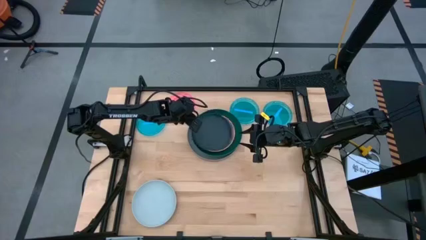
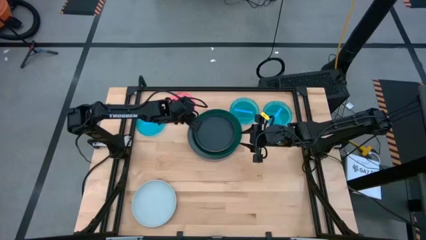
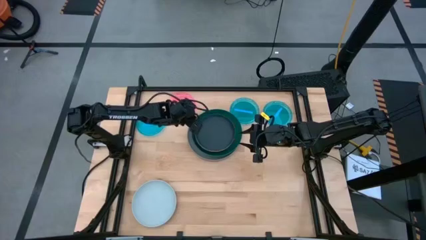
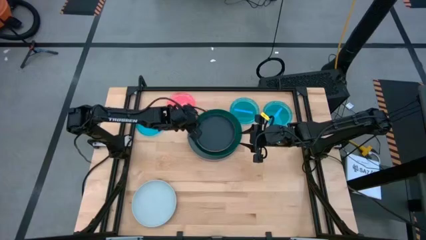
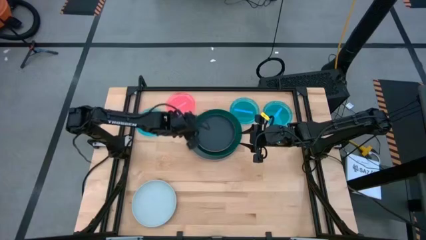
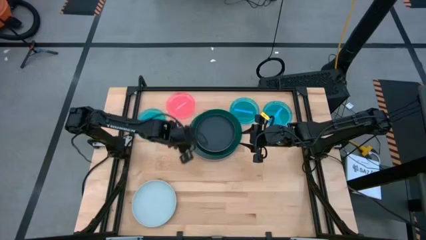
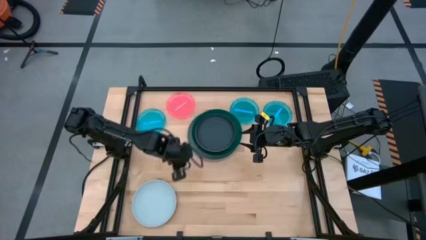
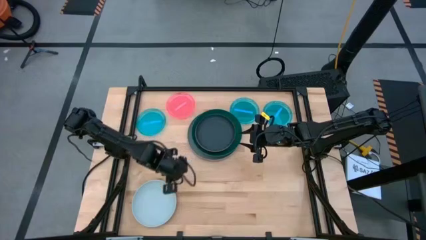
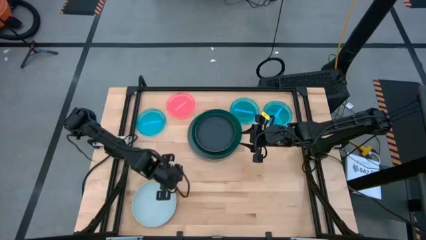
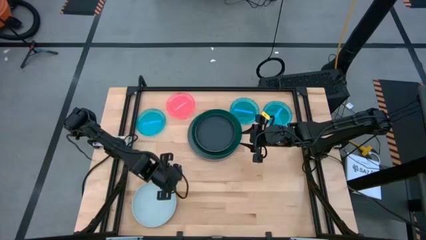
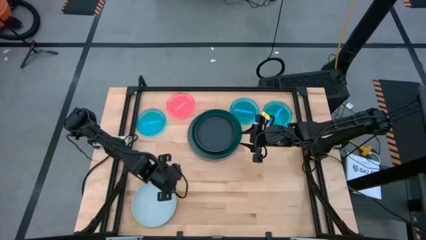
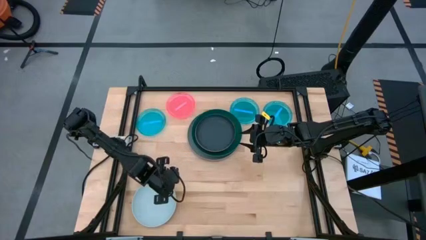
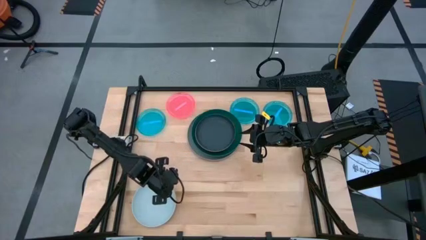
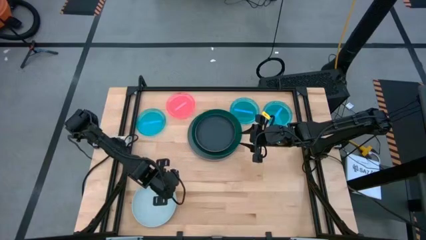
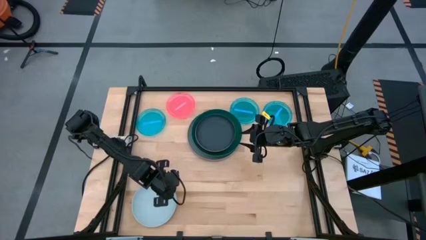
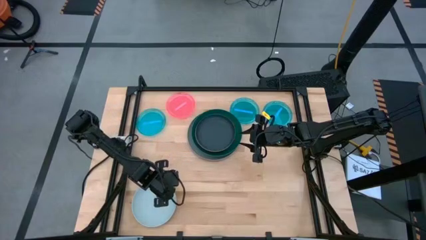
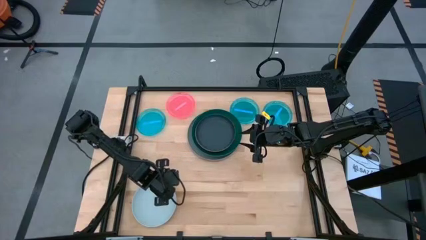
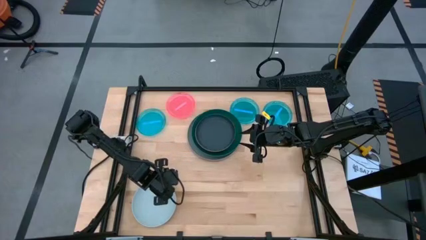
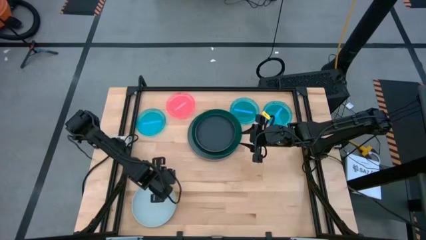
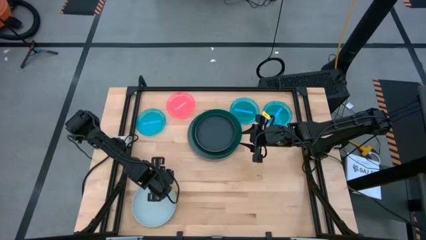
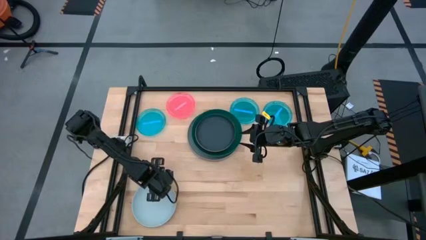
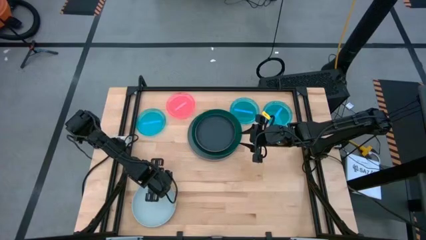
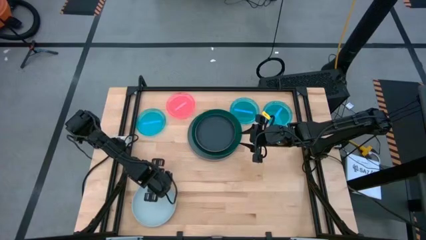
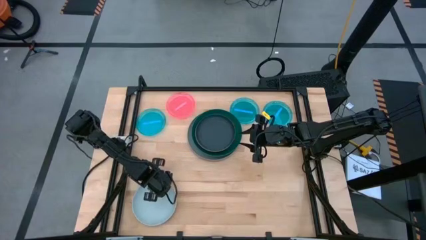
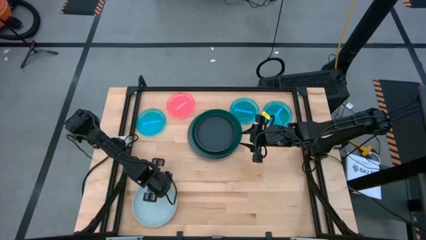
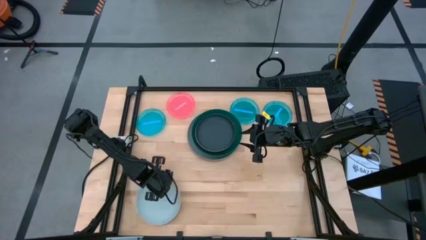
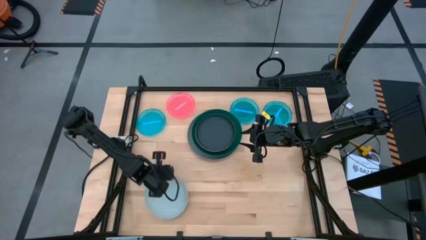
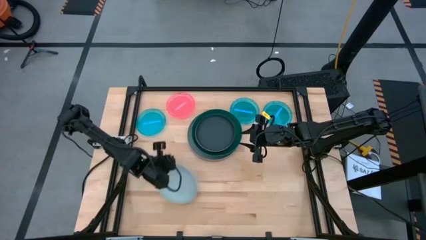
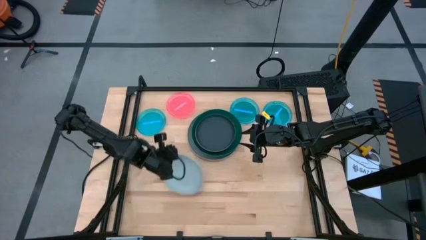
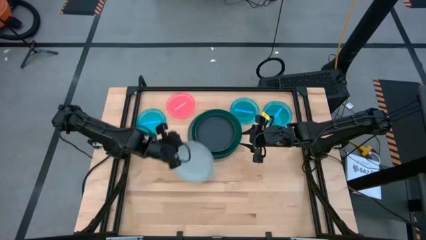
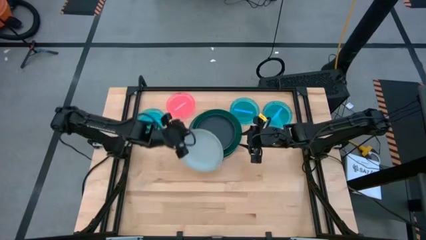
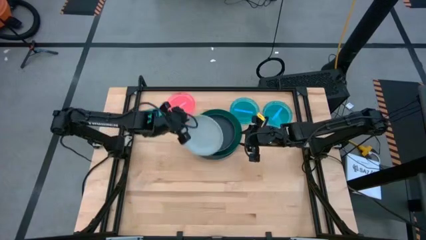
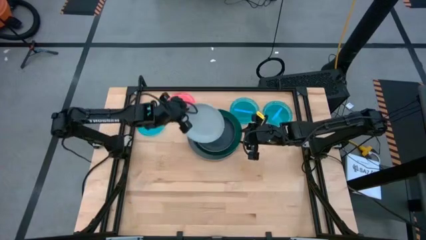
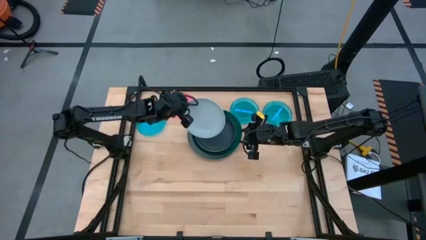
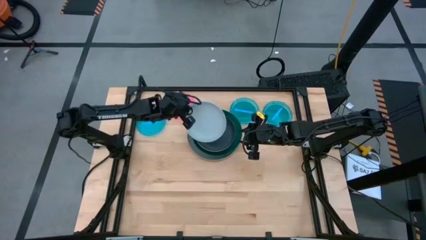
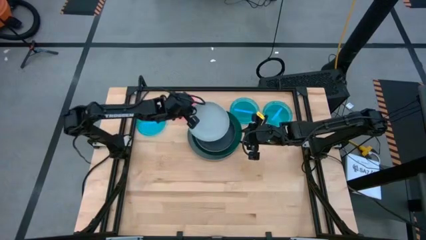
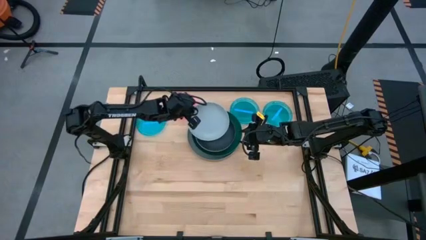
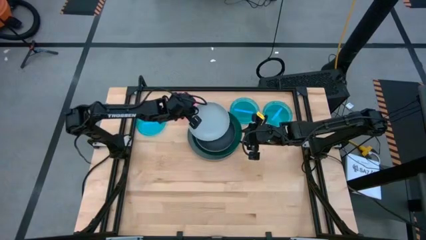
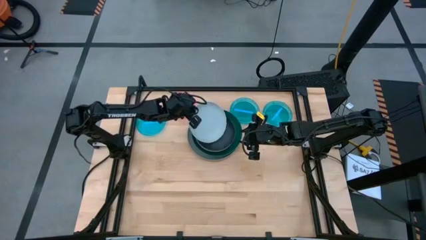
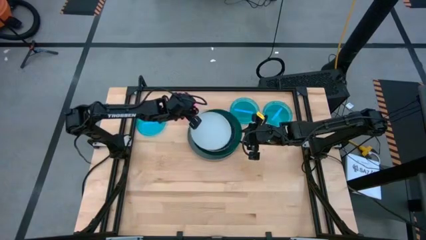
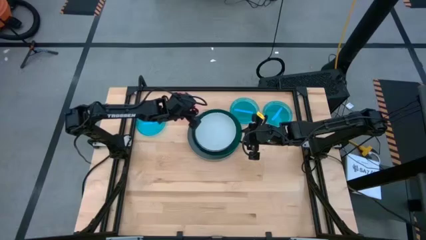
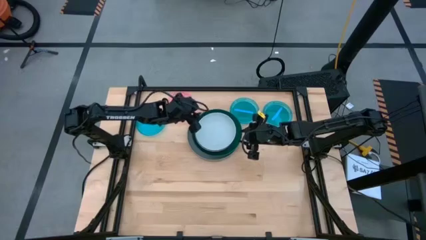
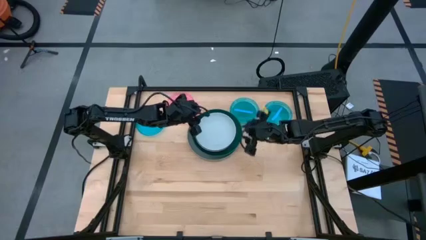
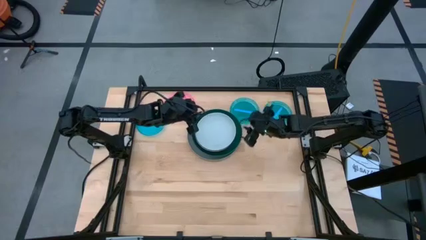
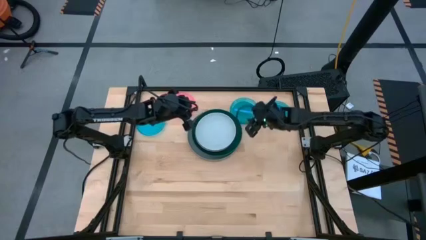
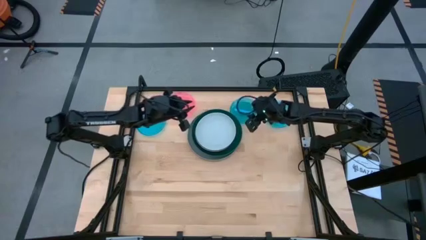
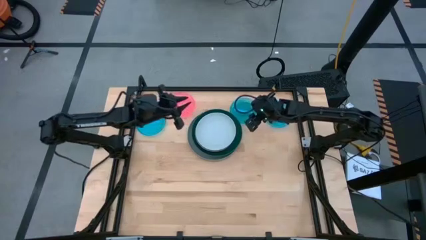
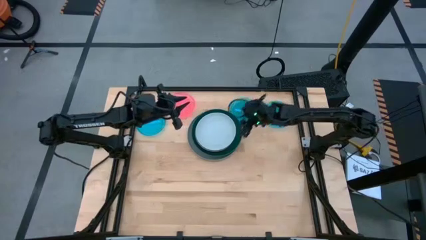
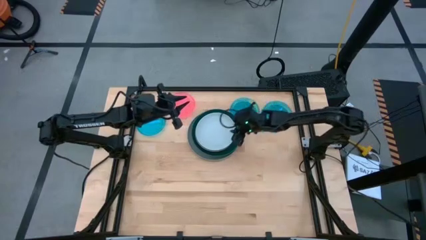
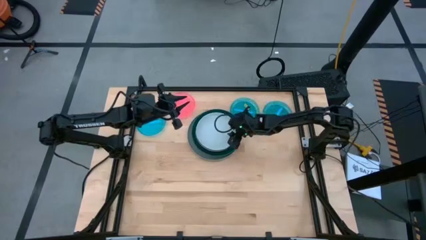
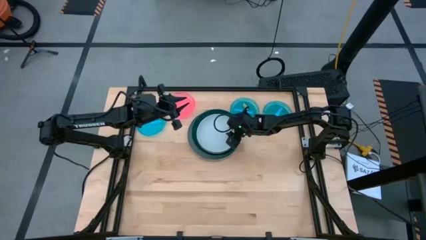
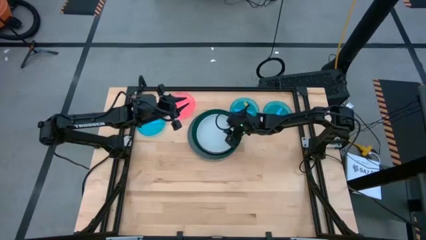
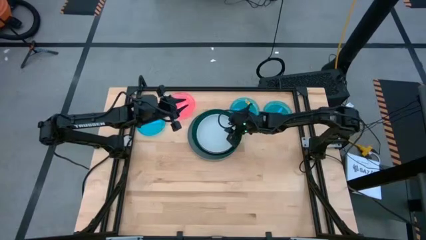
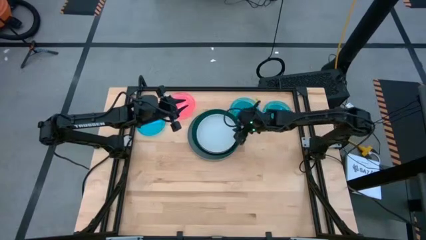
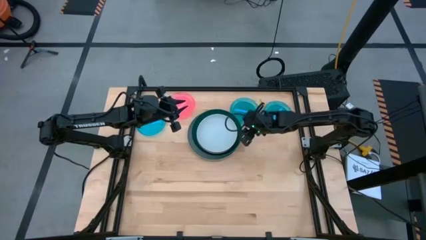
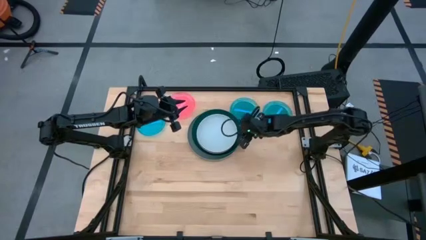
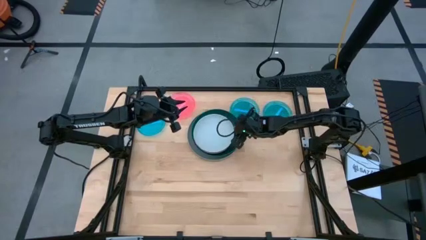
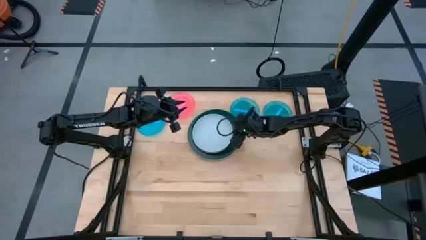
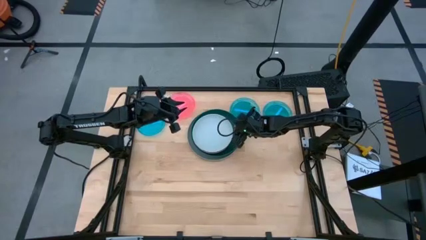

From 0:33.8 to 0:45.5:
Task: Stack plastic plates
Stack the light blue plate on top of the black plate

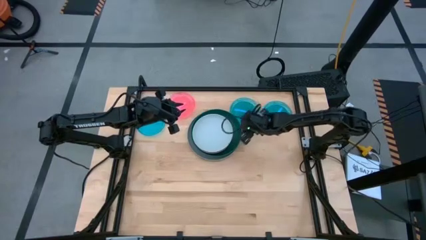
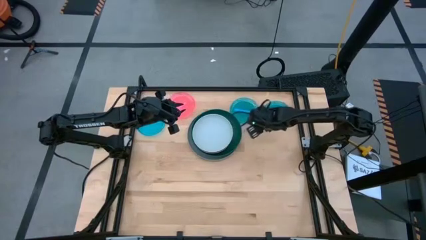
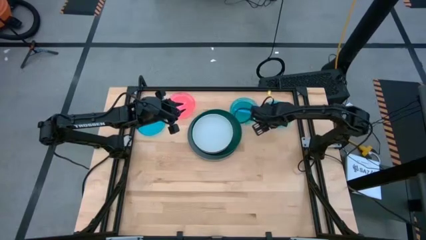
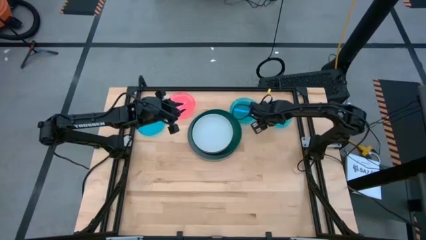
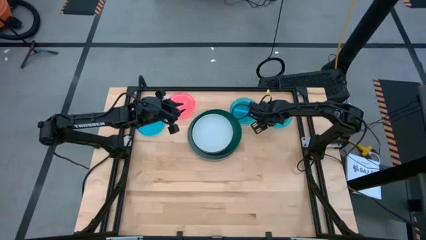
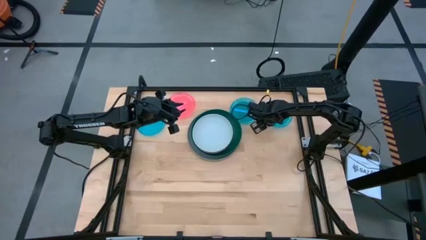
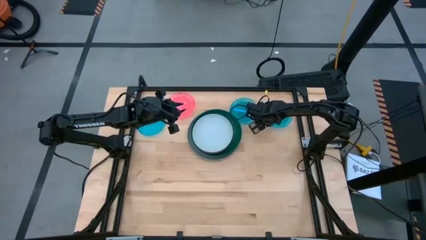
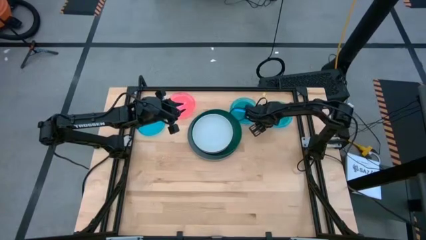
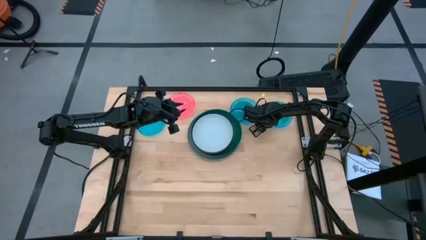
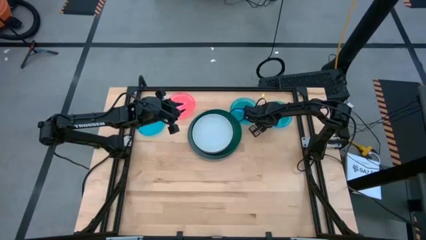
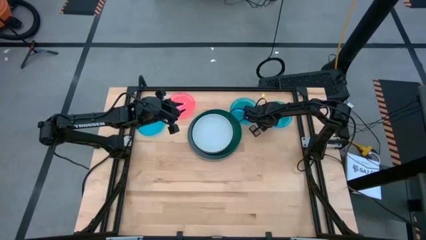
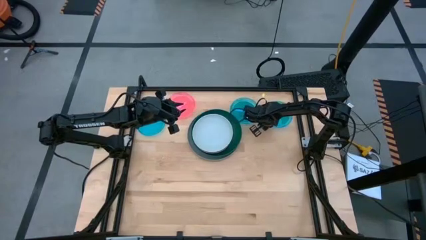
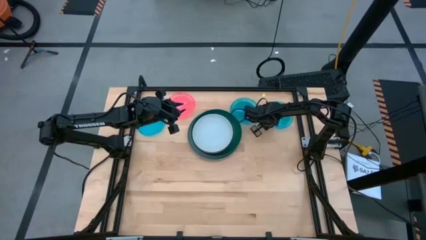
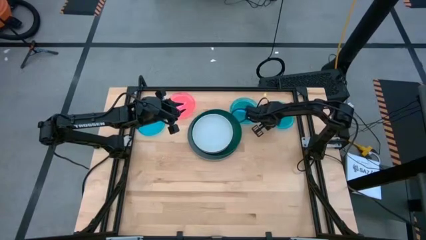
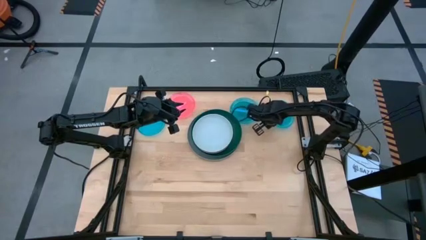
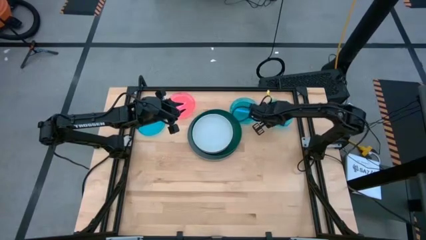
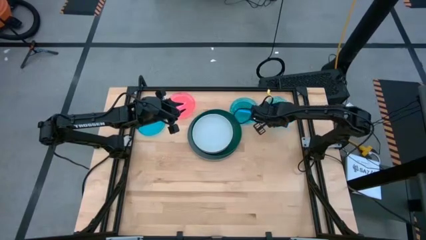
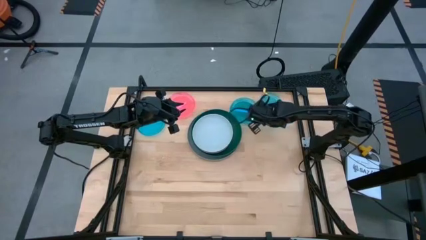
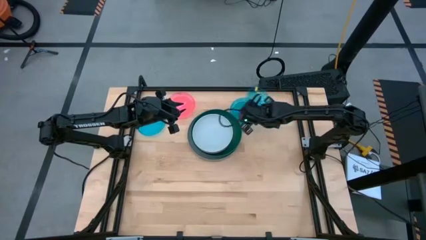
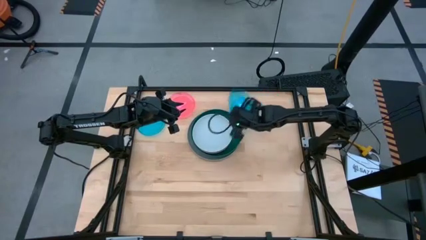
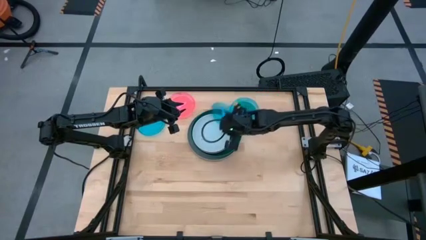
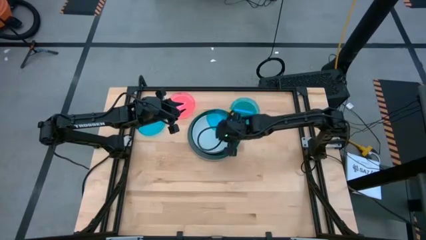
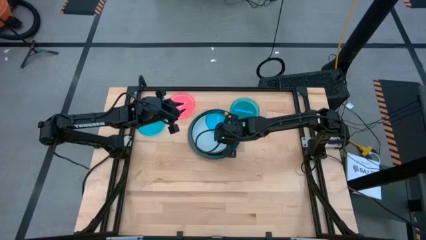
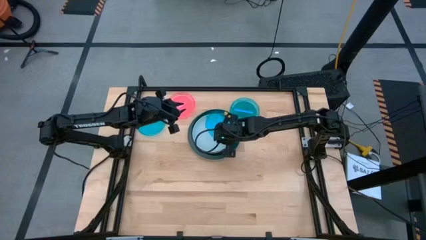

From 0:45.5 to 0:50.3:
Stack the right blue transparent plate on top of the light blue plate
